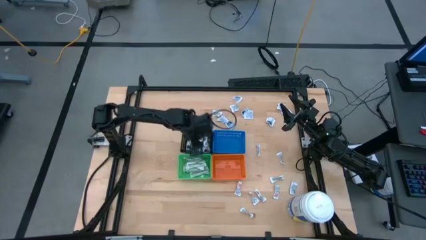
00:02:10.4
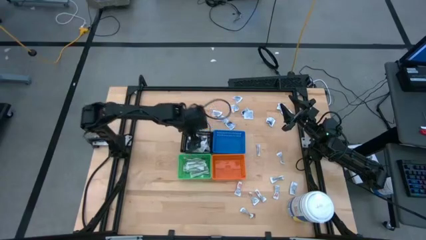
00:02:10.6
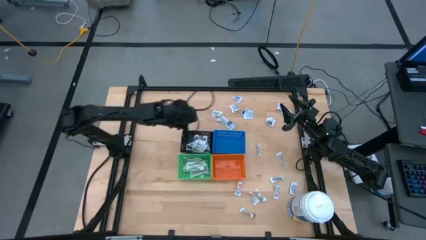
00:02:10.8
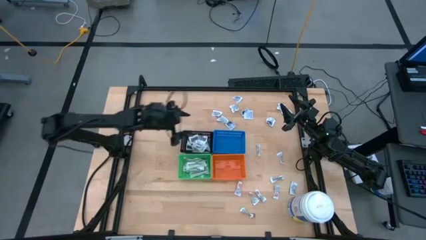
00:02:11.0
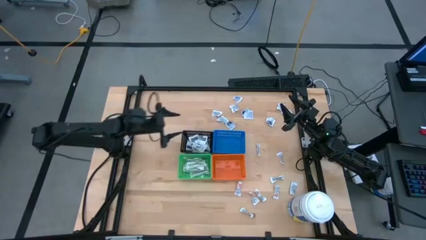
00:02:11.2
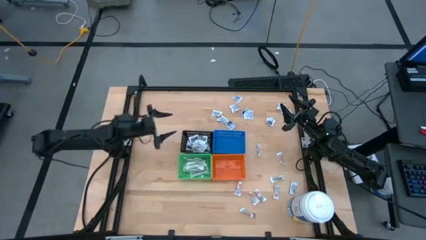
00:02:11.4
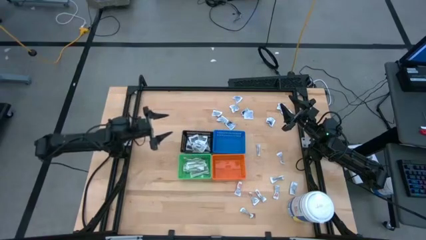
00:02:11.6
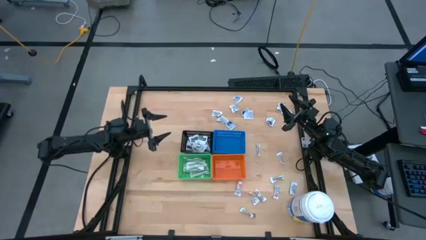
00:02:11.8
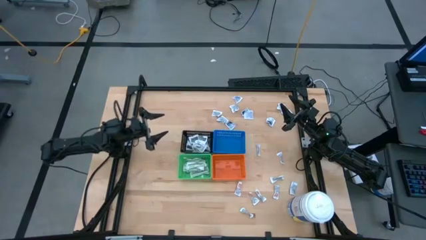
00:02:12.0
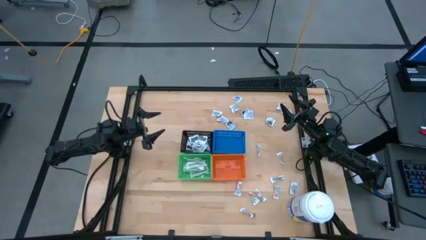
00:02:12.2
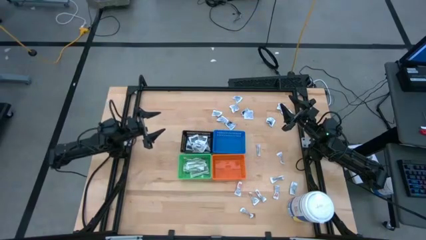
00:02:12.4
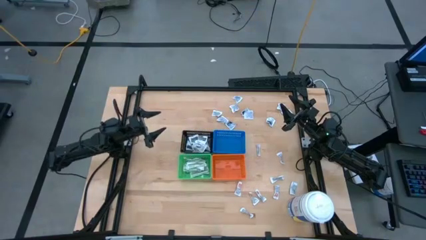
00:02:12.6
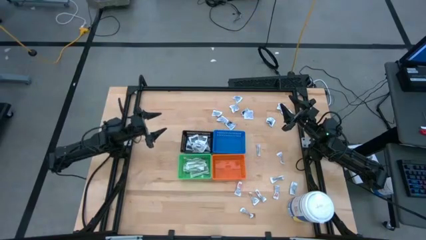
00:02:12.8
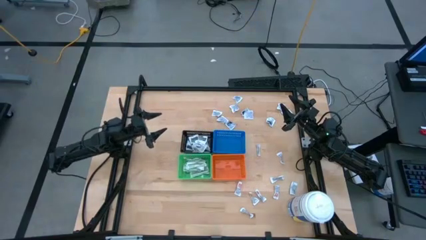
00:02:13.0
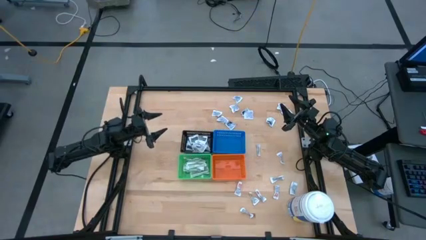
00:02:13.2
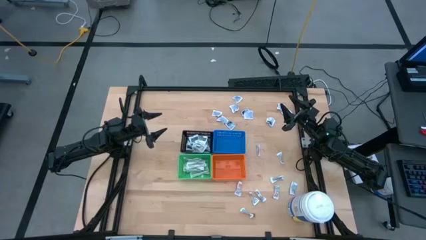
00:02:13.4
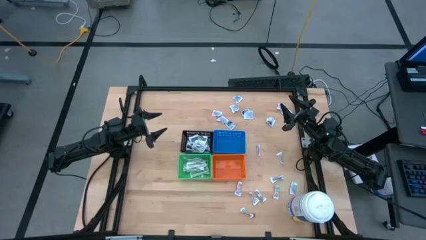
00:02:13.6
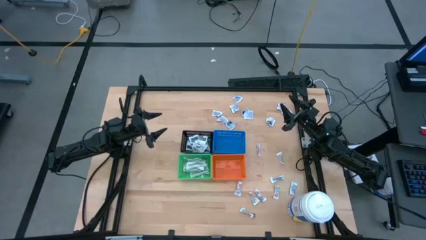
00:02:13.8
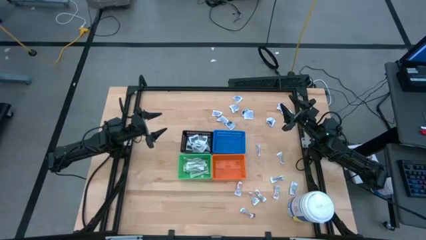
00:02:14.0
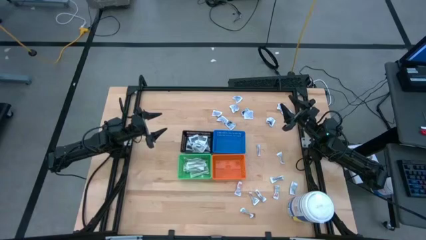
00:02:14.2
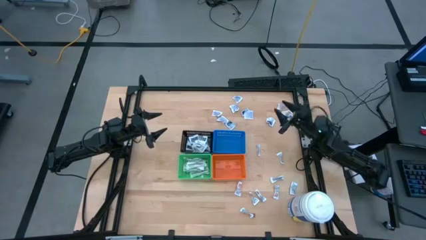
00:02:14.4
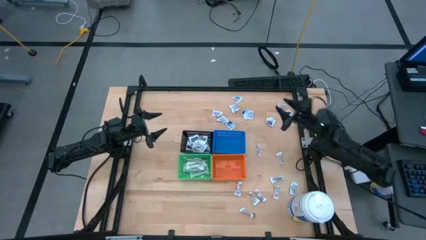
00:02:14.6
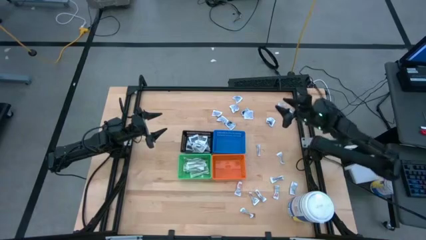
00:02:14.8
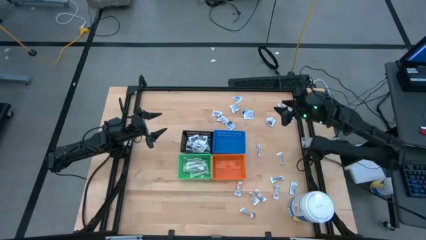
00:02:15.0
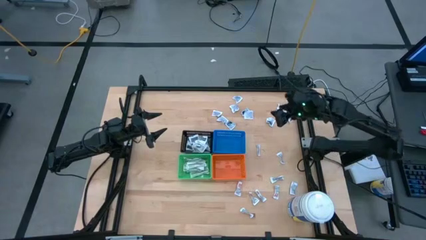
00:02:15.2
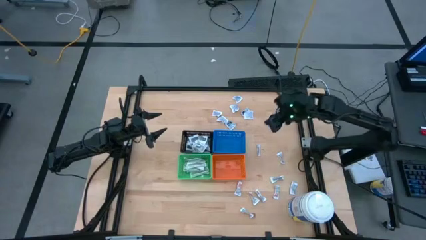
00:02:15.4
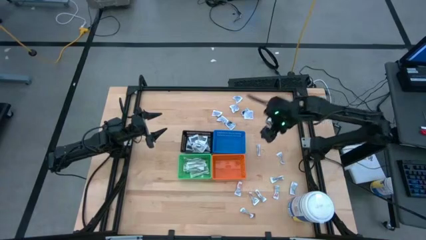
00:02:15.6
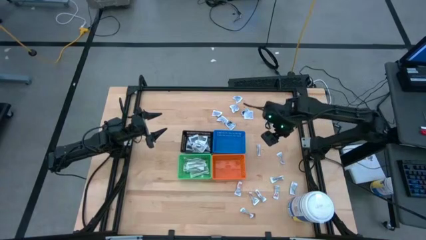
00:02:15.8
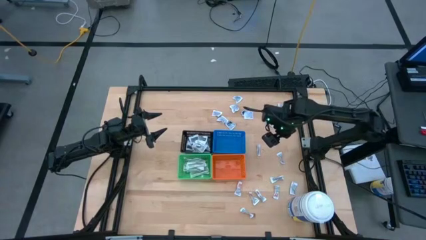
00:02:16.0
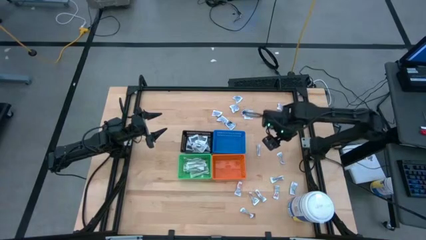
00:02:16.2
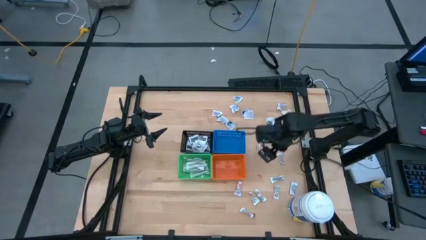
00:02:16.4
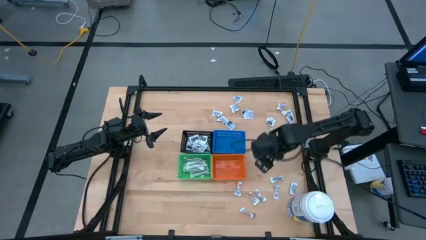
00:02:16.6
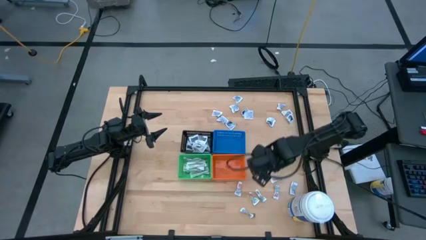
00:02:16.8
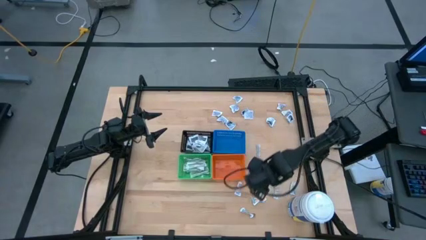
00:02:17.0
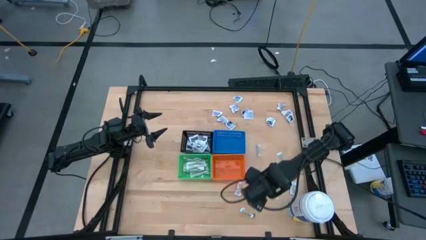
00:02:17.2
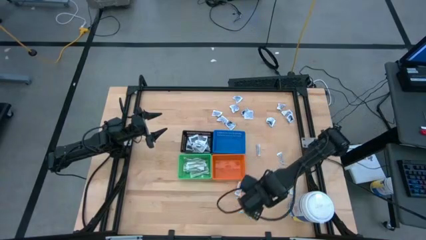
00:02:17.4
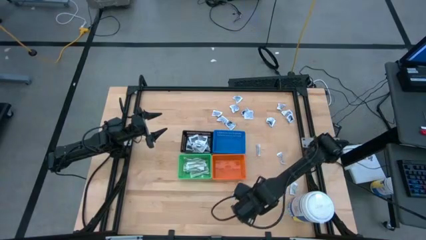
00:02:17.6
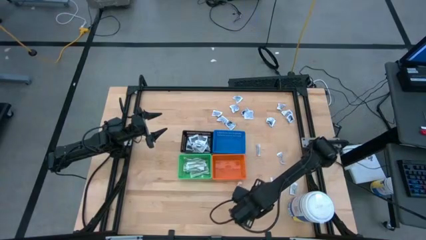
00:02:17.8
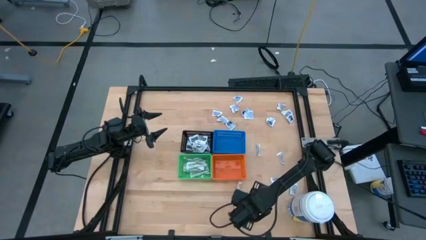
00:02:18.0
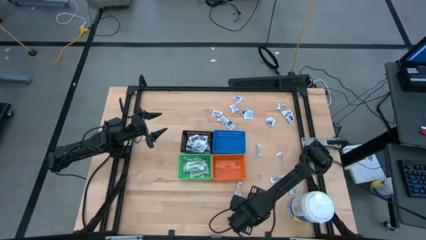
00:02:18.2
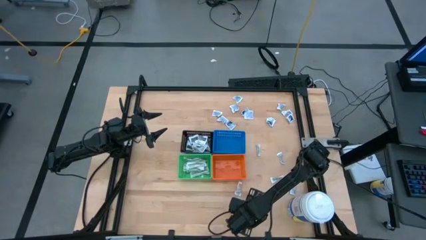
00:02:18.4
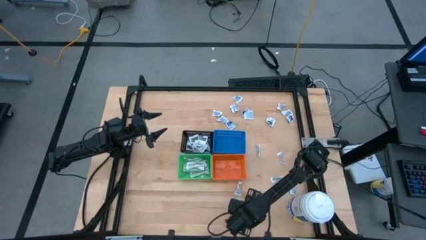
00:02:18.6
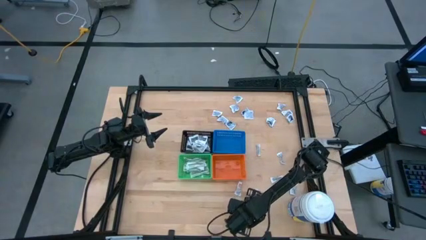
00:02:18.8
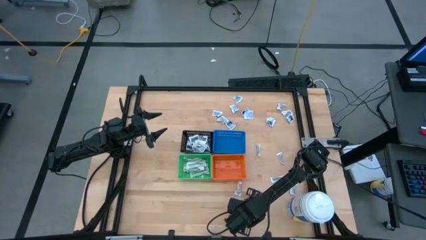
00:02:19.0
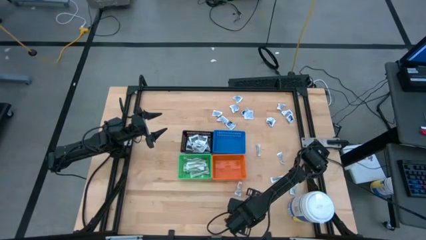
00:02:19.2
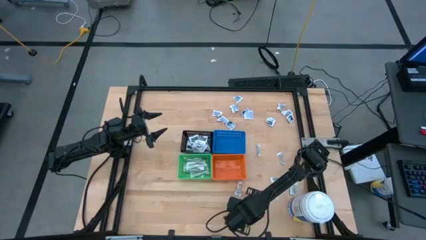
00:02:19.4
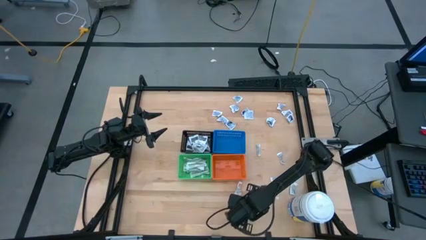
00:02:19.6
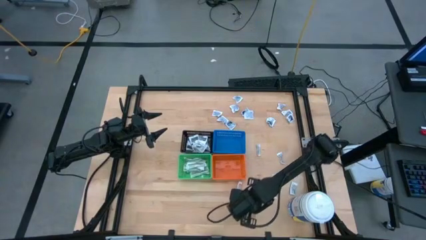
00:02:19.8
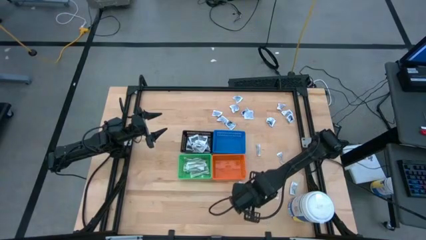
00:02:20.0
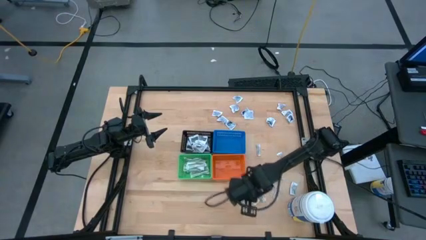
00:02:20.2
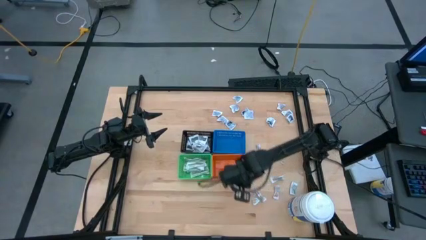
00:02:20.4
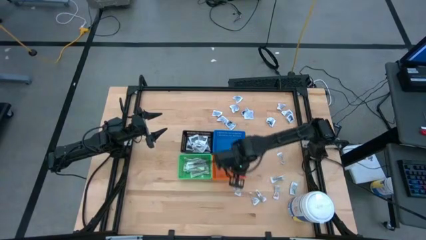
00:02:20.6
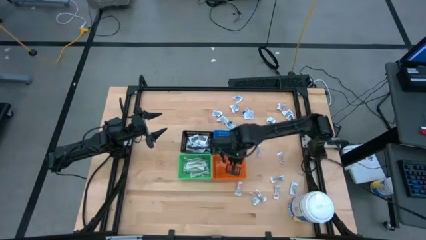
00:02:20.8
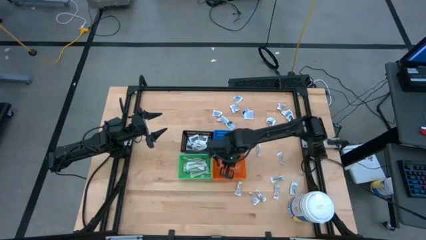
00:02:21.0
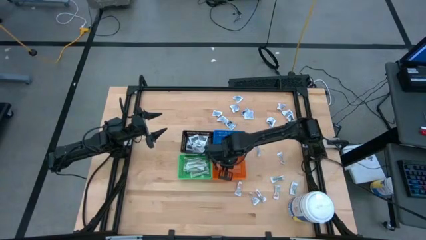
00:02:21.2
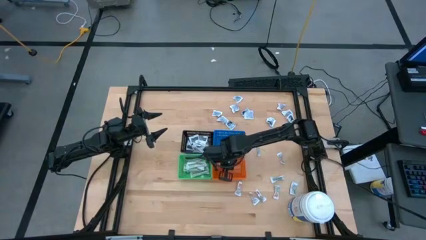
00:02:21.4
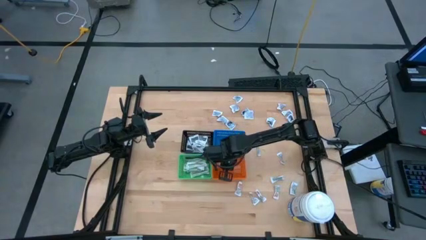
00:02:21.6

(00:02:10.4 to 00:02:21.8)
Task: Pick & Place First Aid Supplies
Put the ointment pack into the orange bin

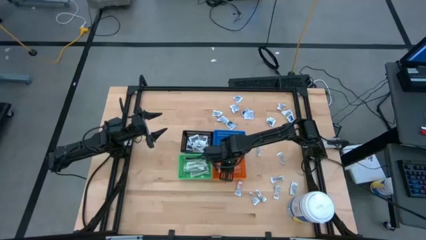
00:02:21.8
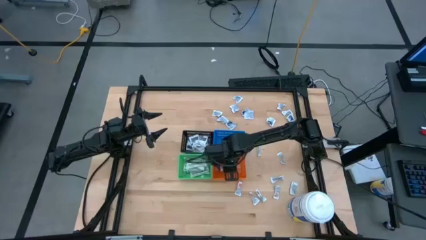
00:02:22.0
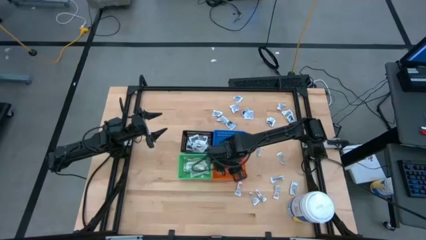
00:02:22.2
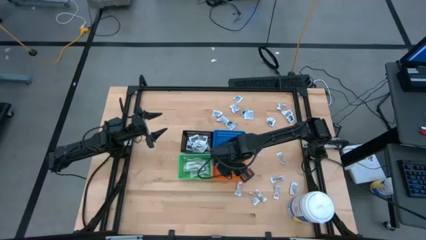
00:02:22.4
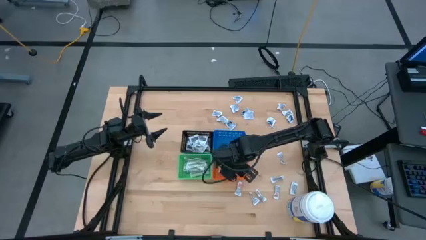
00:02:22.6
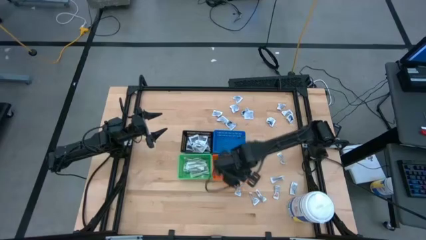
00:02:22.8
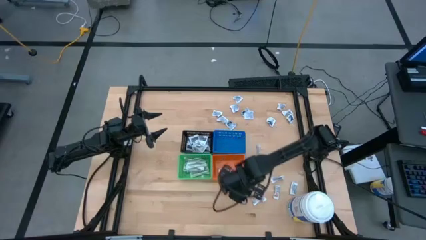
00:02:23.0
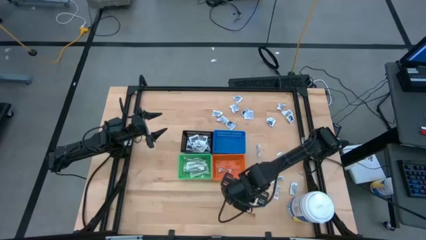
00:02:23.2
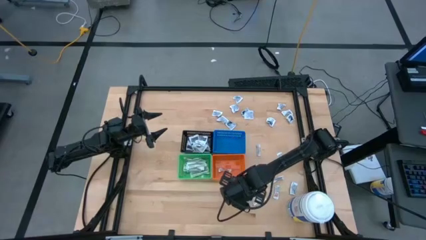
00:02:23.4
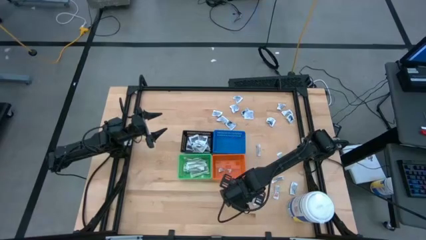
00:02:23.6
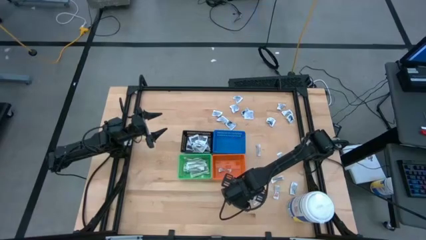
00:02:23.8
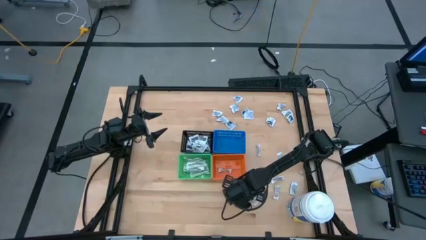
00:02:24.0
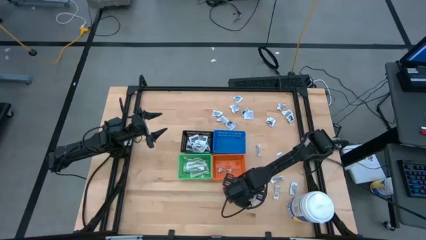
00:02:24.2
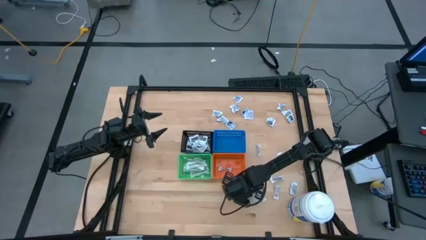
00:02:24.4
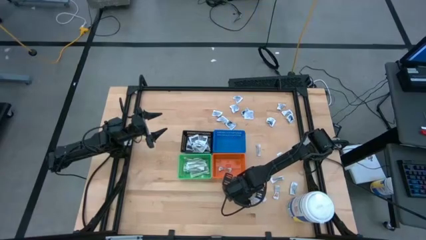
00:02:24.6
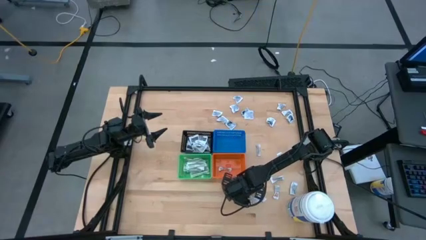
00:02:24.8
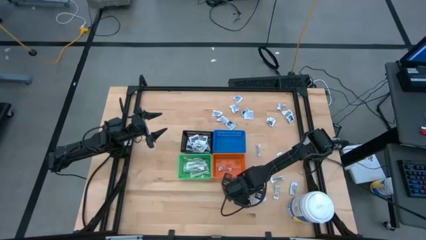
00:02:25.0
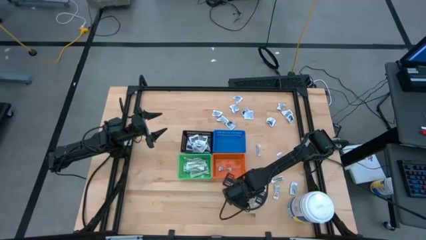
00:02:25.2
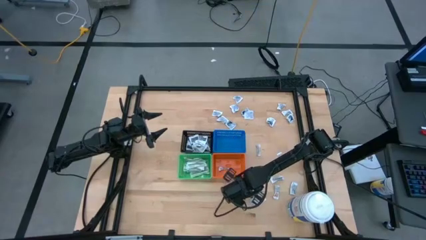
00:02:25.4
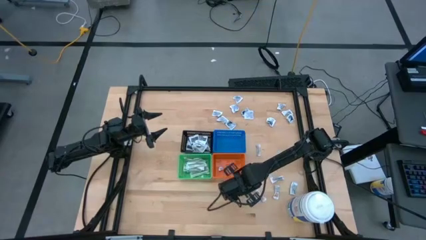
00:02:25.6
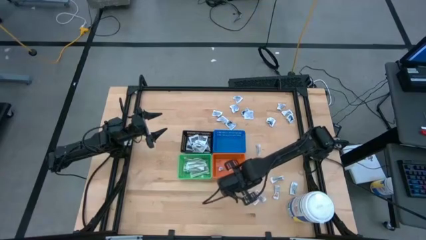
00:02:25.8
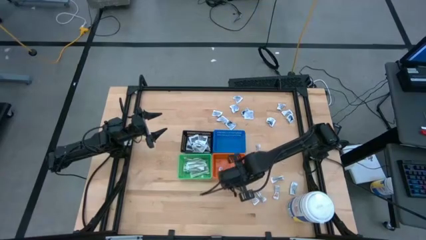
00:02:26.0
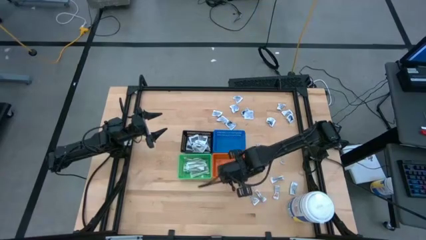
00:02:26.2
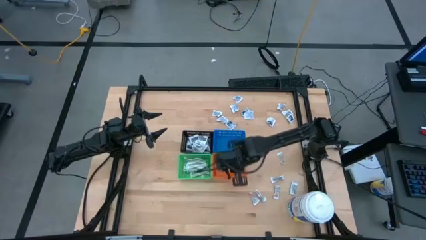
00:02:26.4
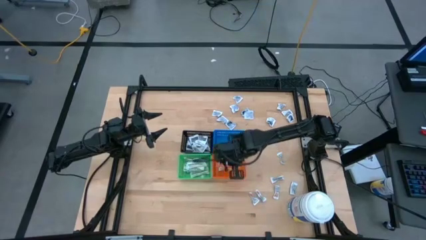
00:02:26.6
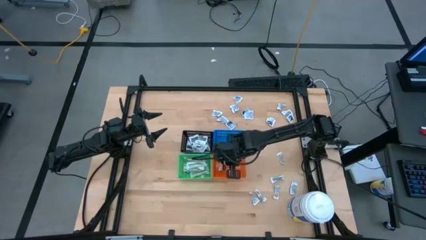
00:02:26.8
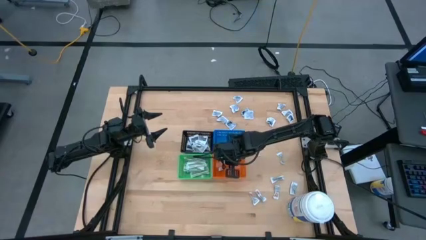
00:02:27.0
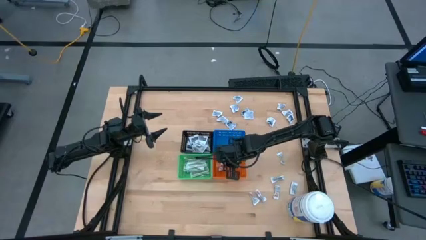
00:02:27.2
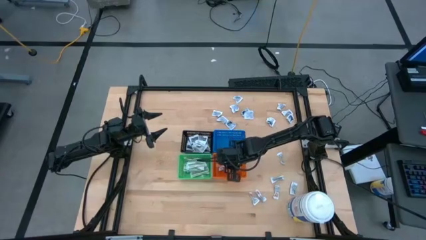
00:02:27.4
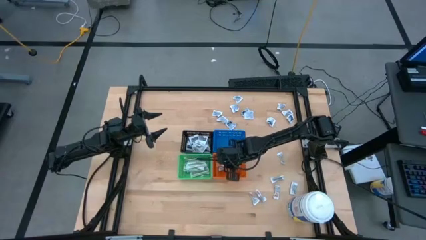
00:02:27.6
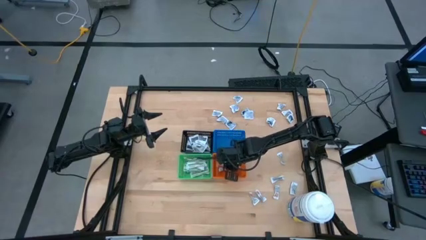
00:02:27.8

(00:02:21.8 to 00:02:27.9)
Put the ointment pack into the orange bin
